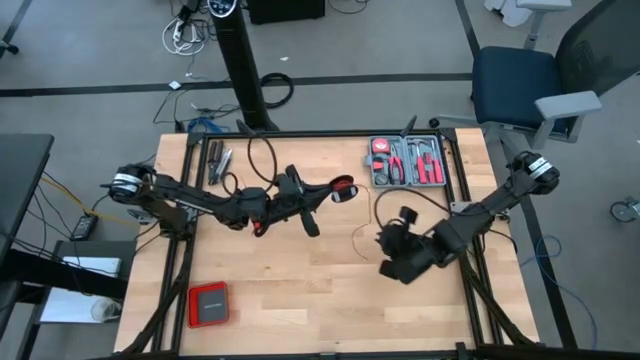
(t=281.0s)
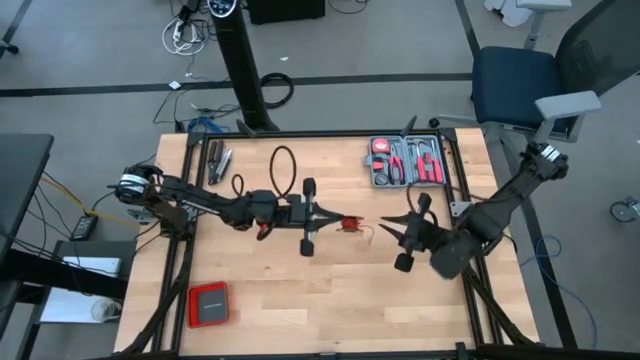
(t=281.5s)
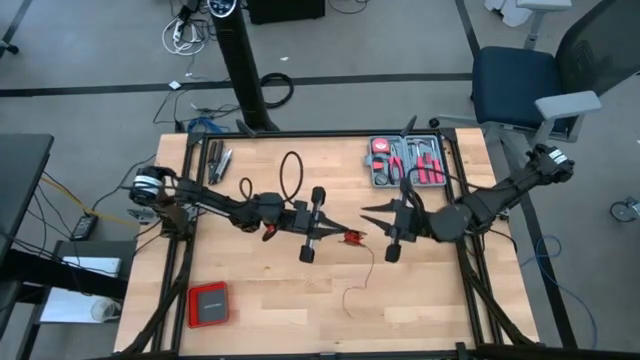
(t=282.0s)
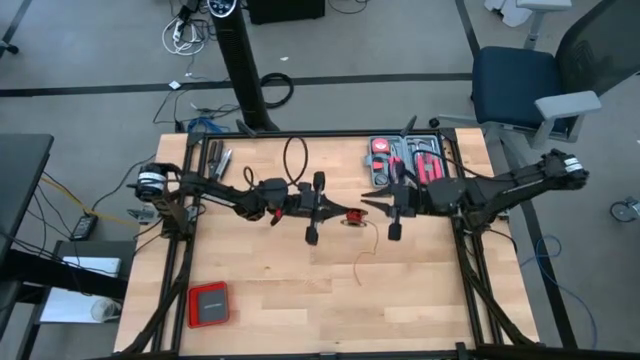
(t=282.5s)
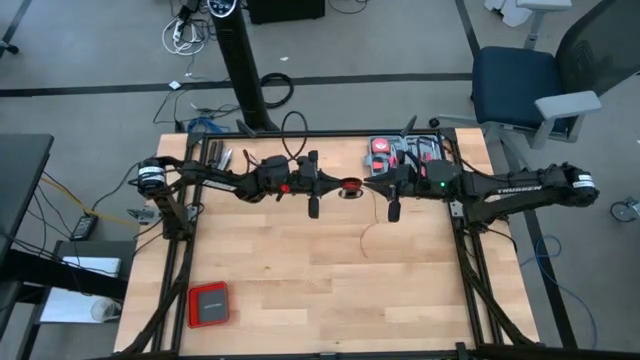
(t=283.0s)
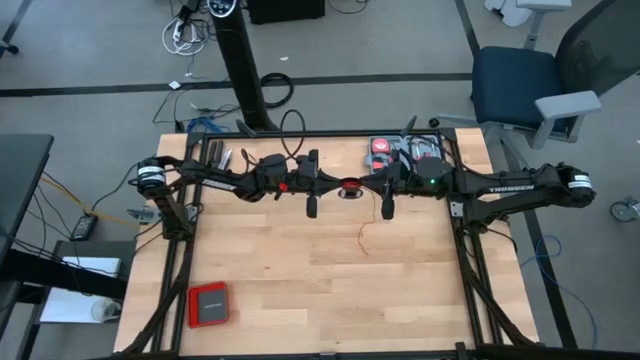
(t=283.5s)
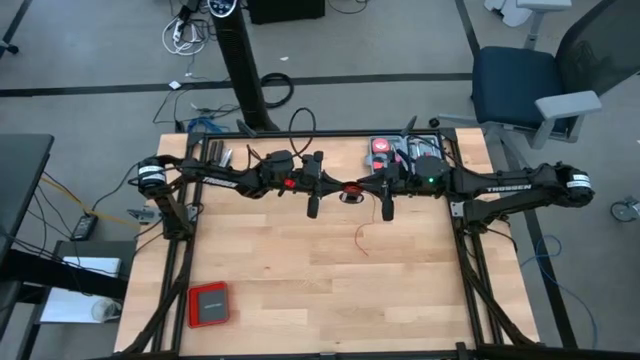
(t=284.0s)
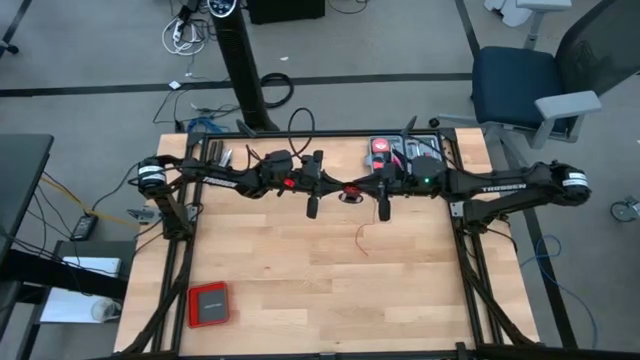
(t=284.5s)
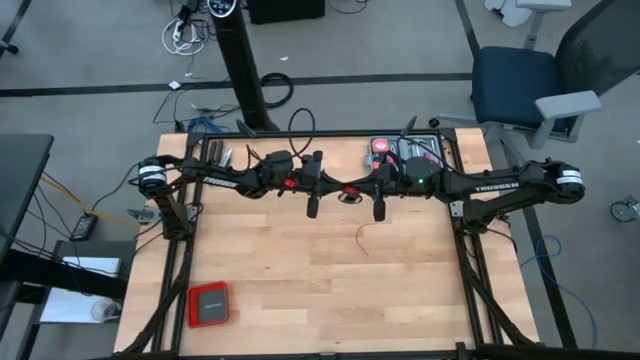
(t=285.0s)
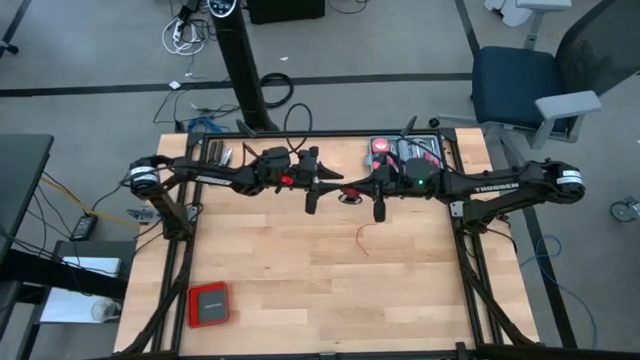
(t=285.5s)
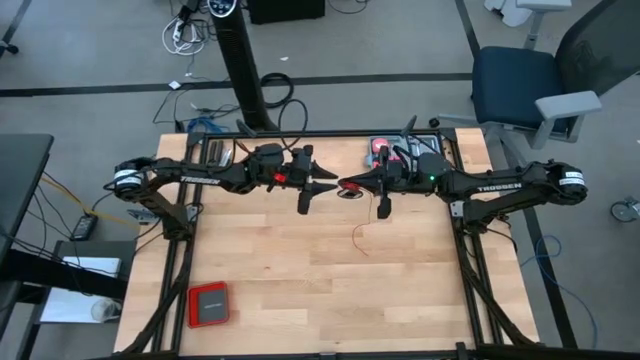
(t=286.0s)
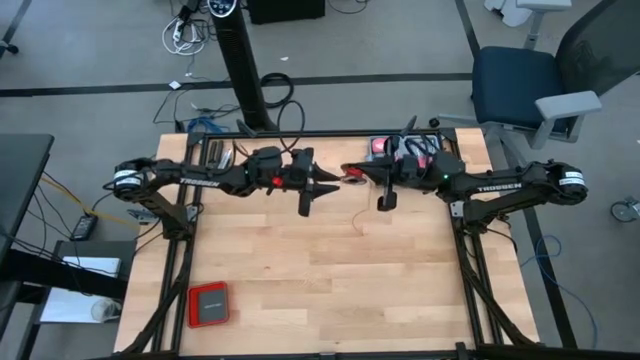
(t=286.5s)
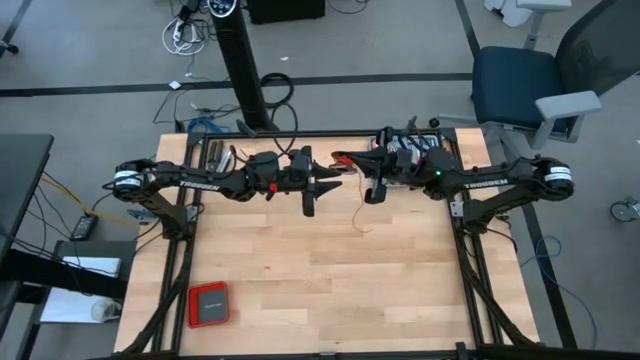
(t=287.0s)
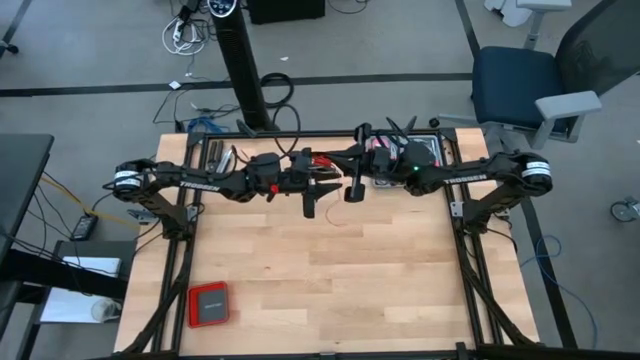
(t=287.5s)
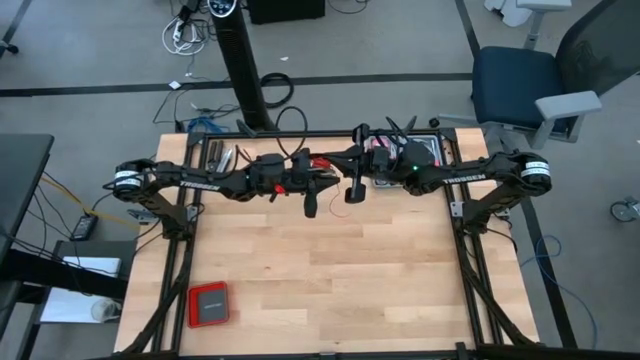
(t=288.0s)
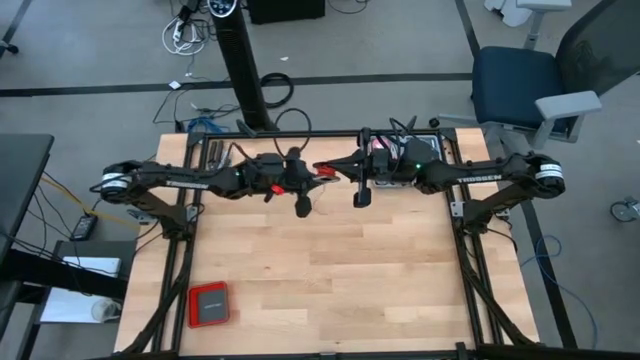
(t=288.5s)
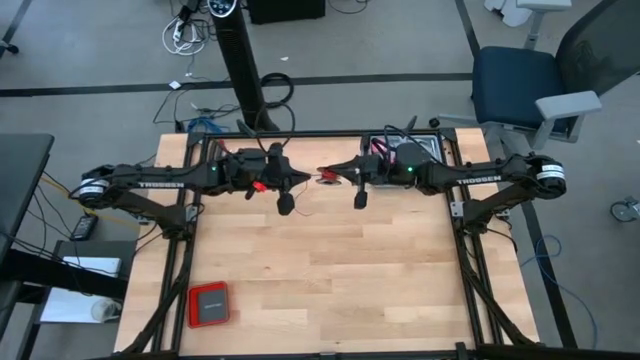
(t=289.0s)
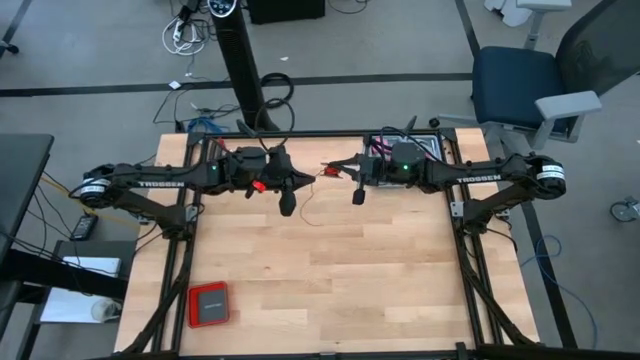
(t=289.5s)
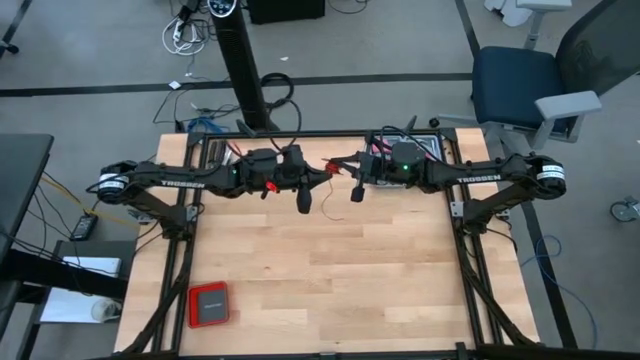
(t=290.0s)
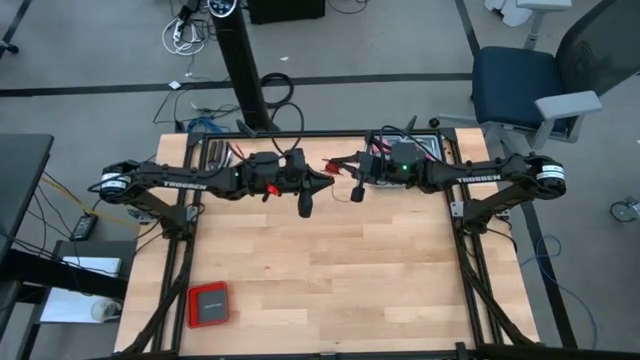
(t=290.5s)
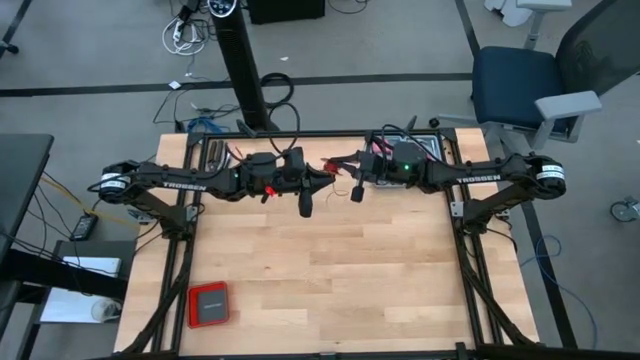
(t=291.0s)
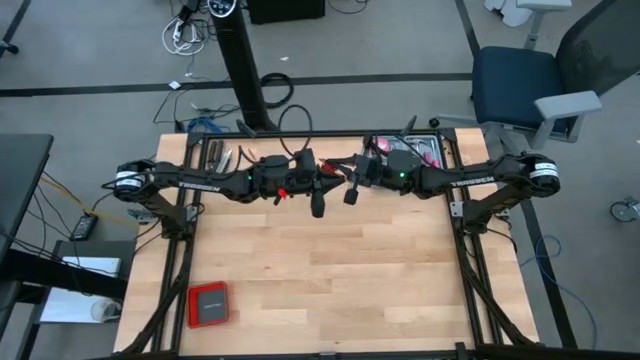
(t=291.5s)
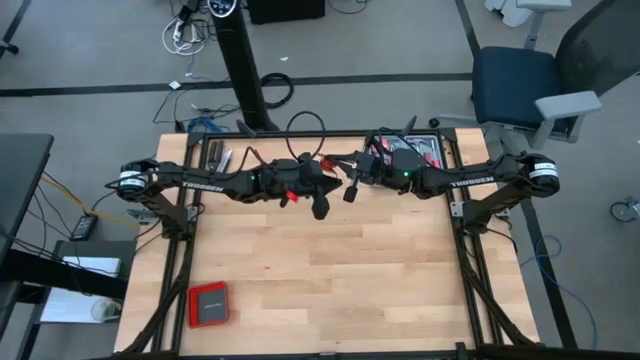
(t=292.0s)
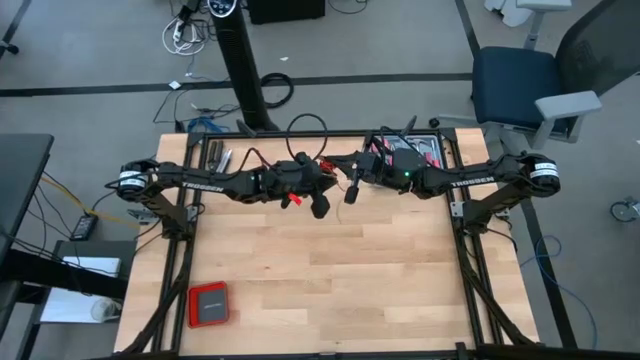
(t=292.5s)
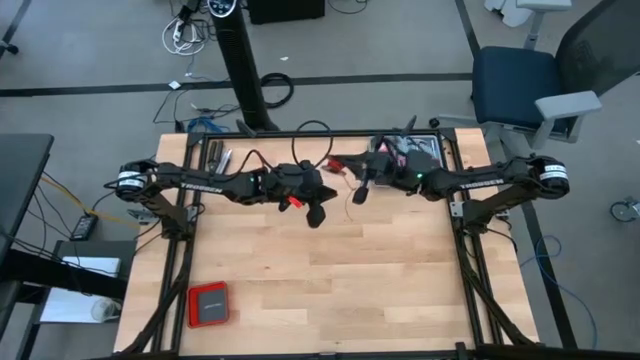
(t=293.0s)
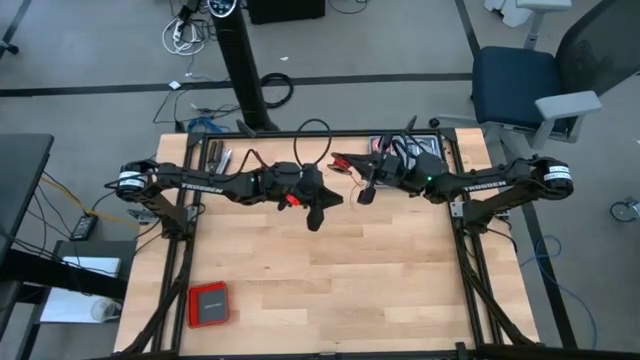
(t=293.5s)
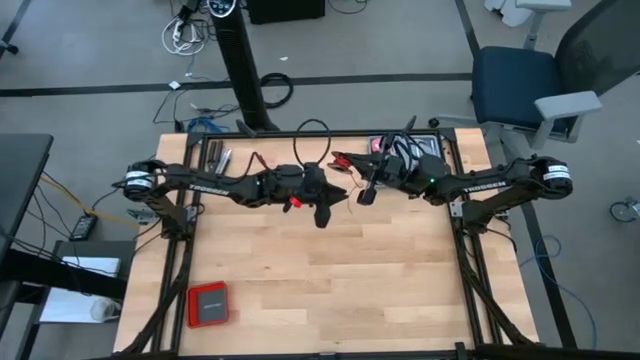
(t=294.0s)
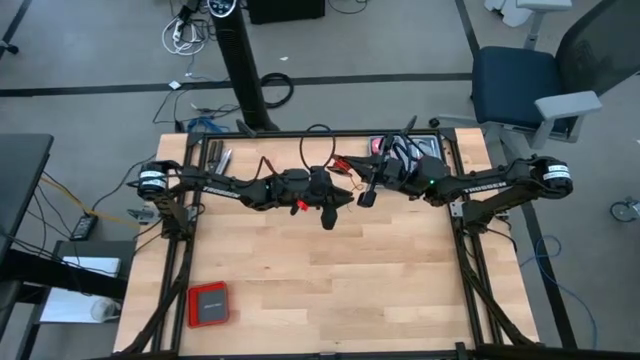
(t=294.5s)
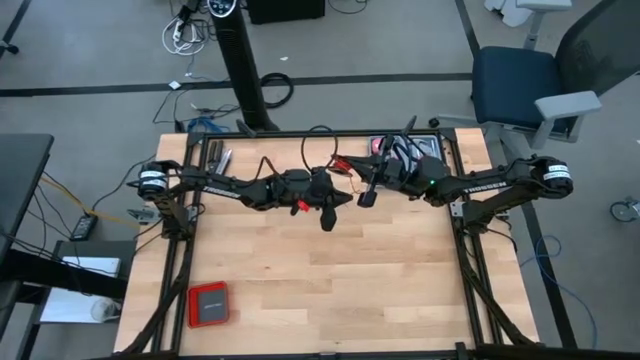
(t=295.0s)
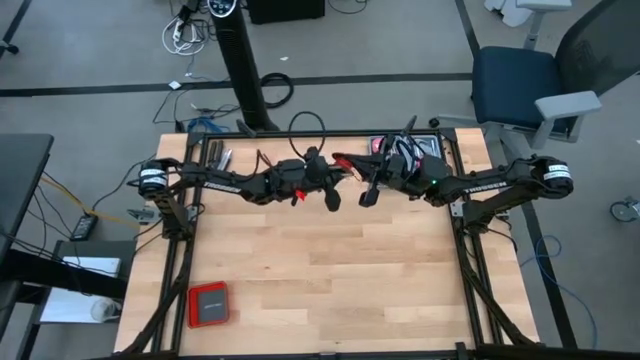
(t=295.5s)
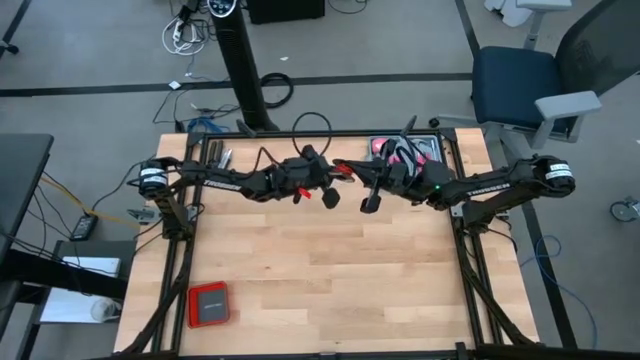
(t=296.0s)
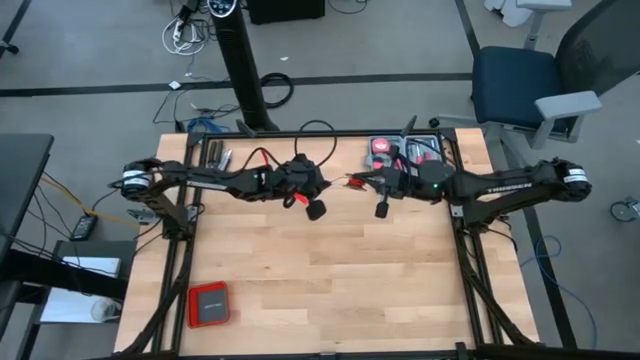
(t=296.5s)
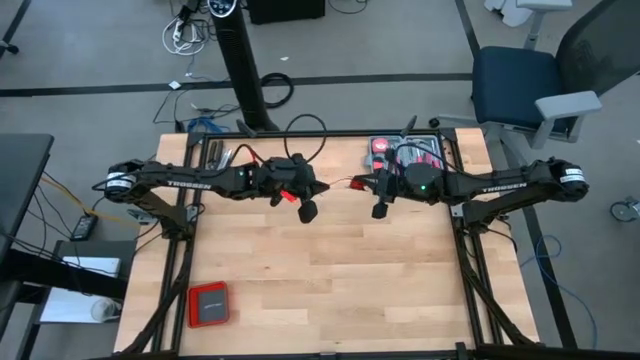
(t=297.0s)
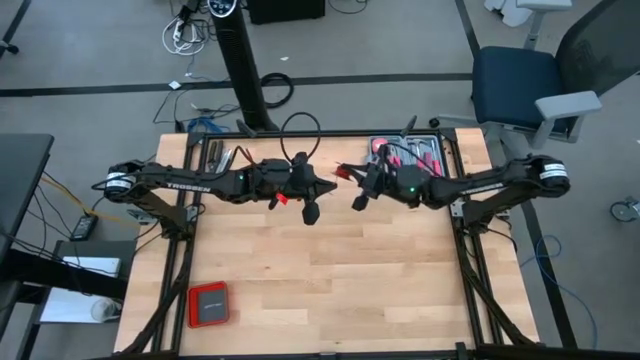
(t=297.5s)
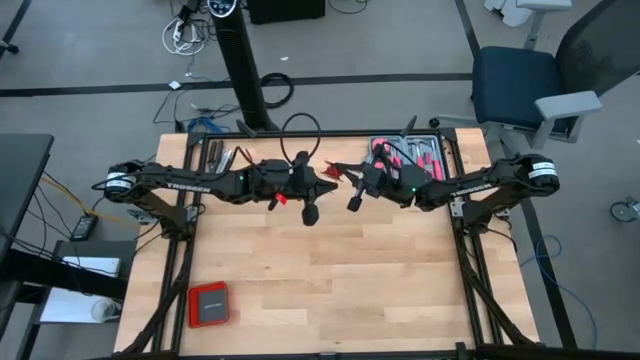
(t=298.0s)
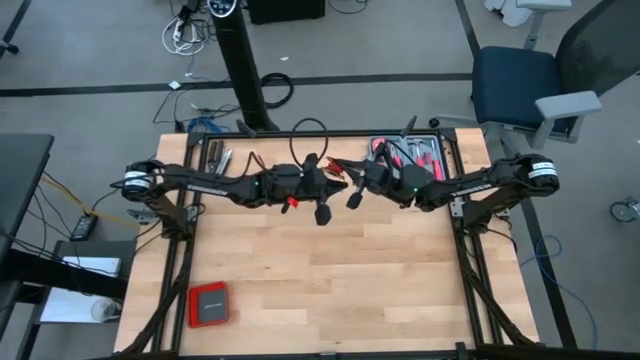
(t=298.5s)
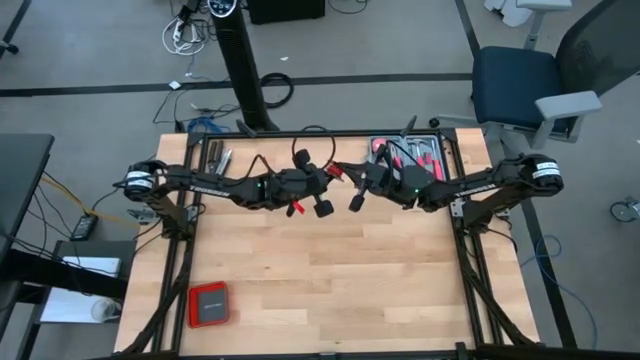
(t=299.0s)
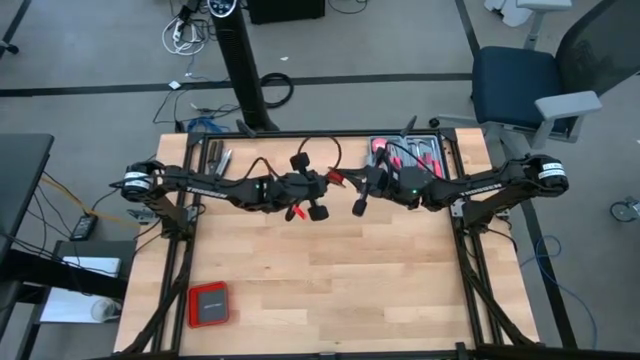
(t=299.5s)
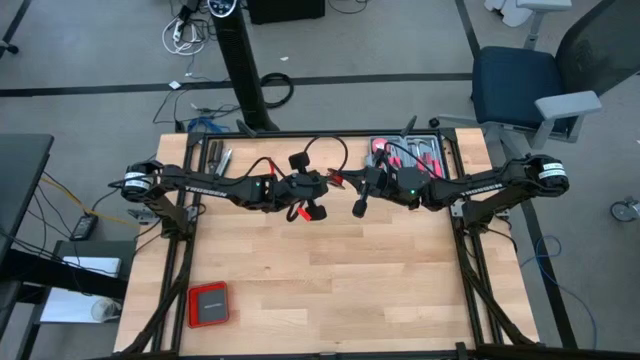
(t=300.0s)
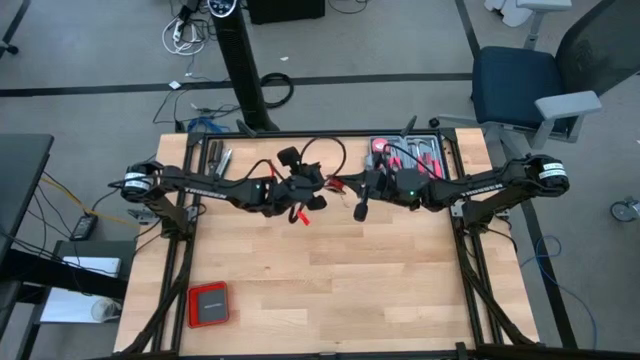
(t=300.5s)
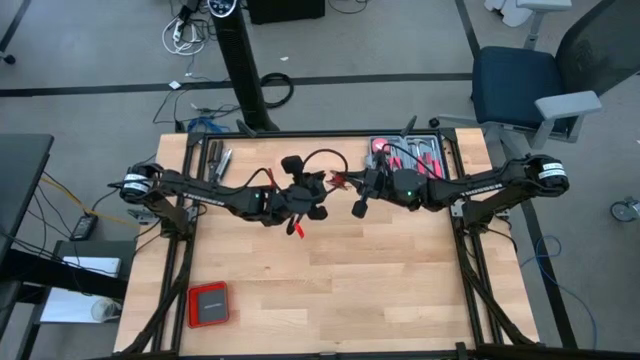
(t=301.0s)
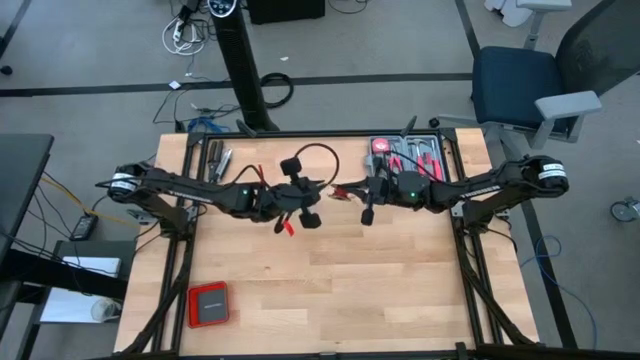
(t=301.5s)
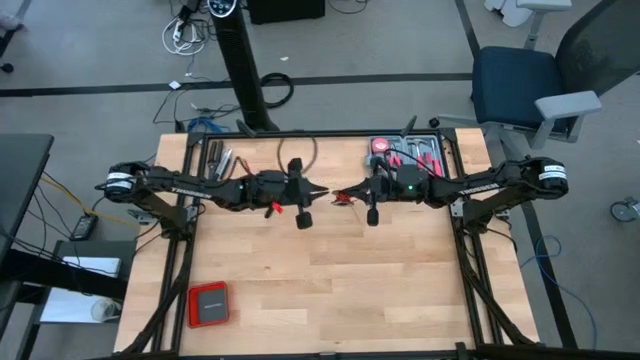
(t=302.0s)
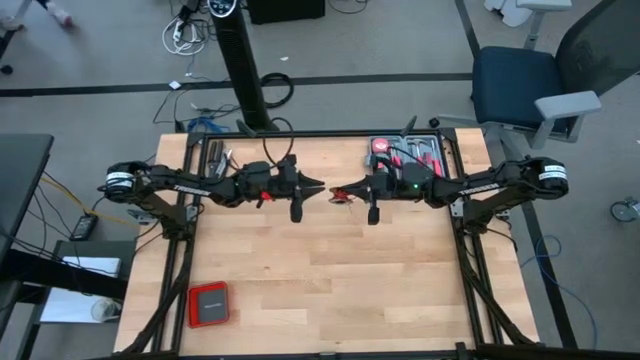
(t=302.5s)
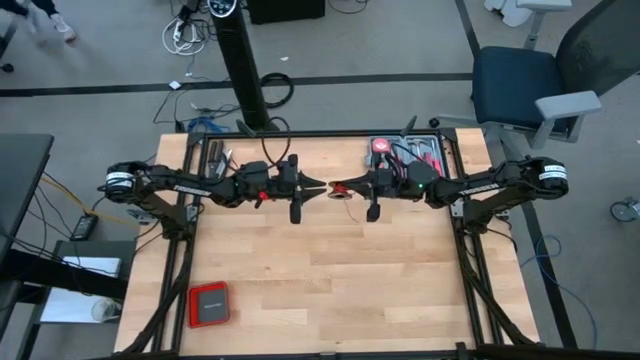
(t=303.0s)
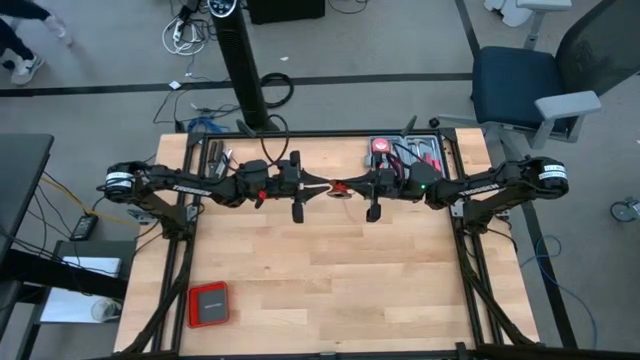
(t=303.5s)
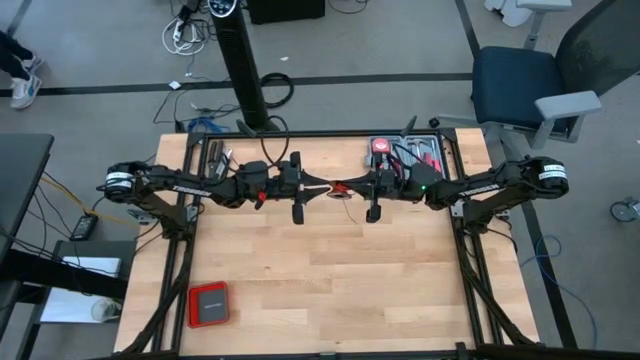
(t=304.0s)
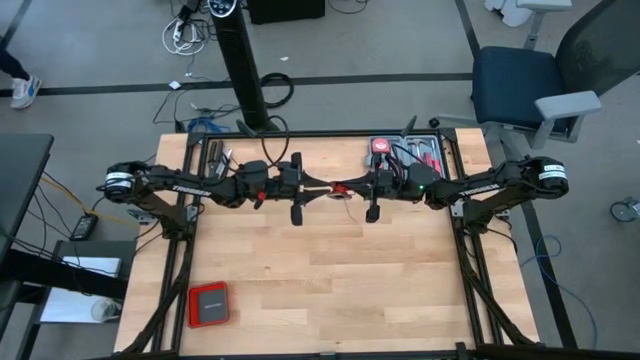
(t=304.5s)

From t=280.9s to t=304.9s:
Task: Coil cords
Coil the red cable wire onto the black spool
